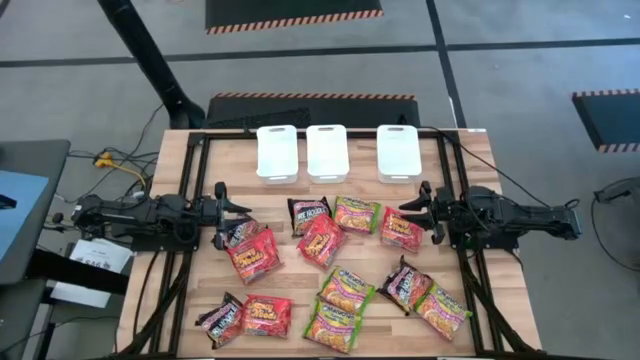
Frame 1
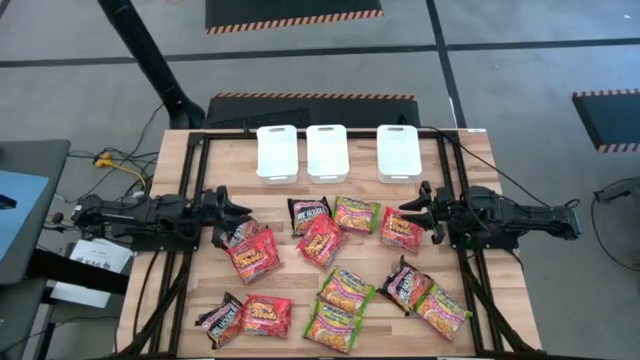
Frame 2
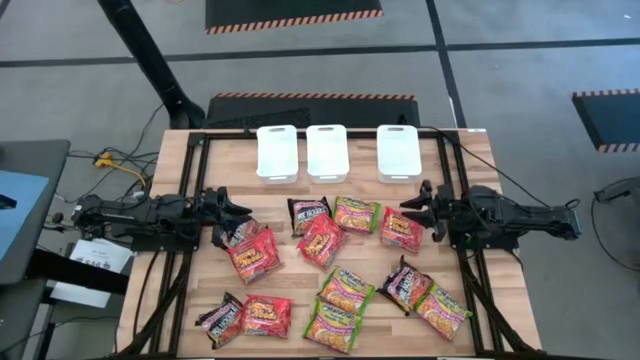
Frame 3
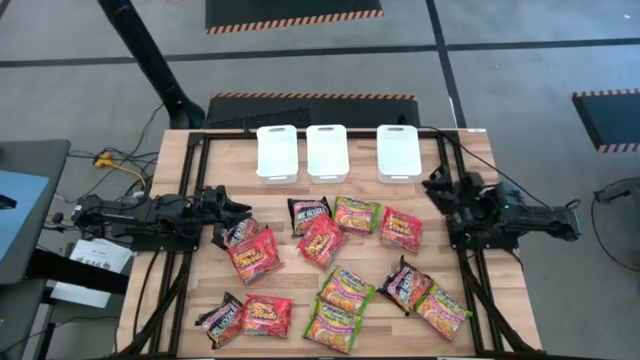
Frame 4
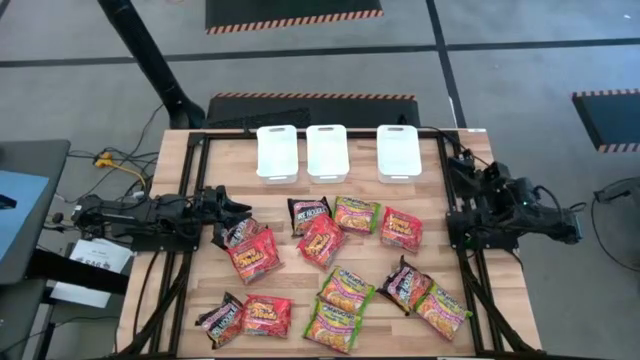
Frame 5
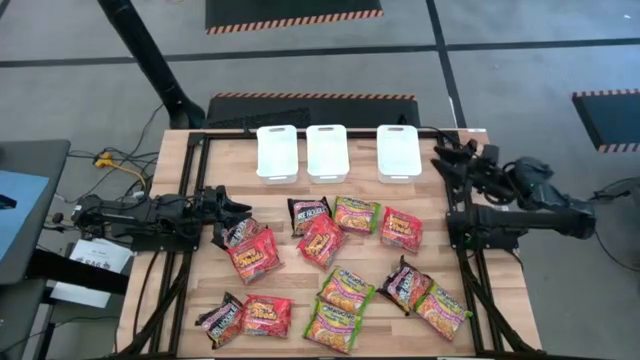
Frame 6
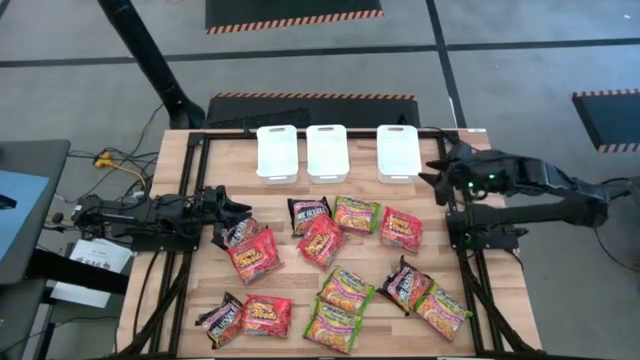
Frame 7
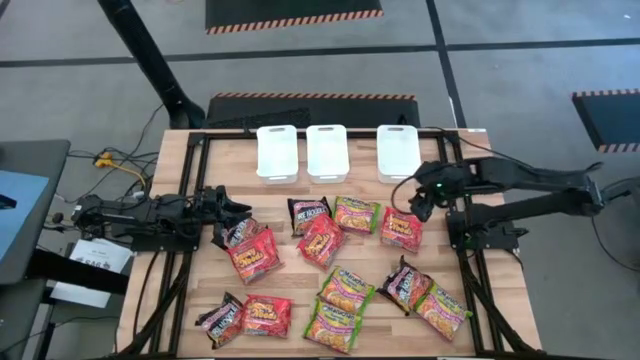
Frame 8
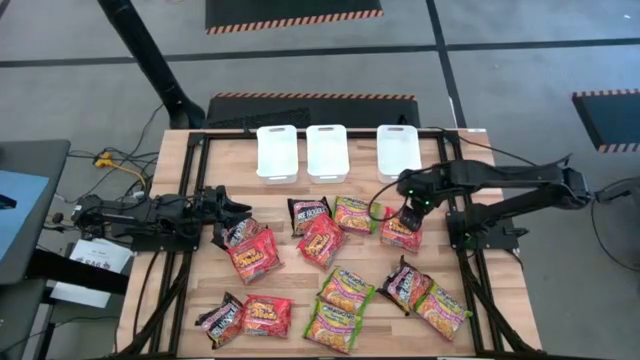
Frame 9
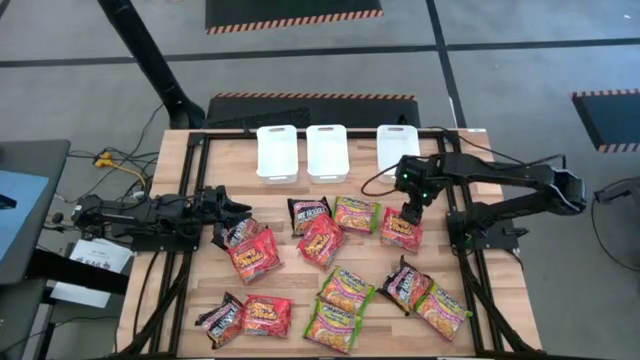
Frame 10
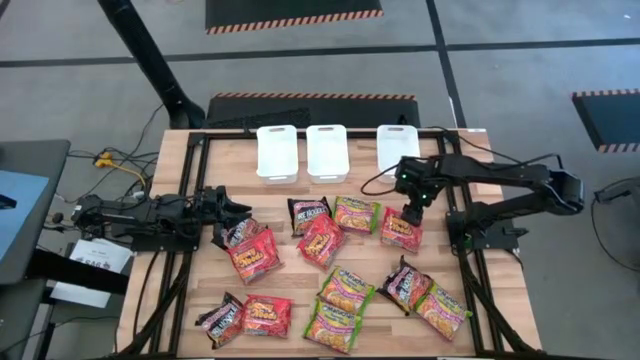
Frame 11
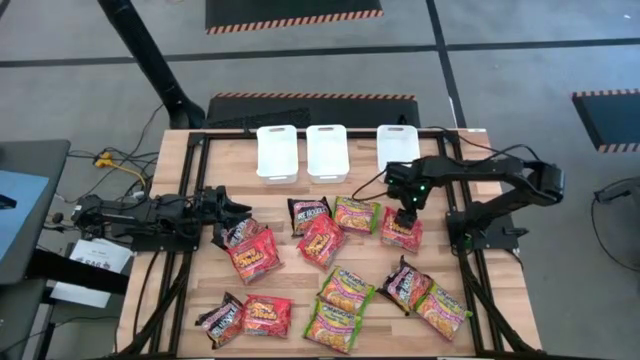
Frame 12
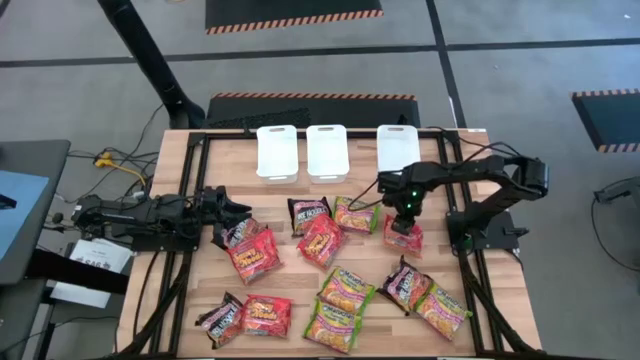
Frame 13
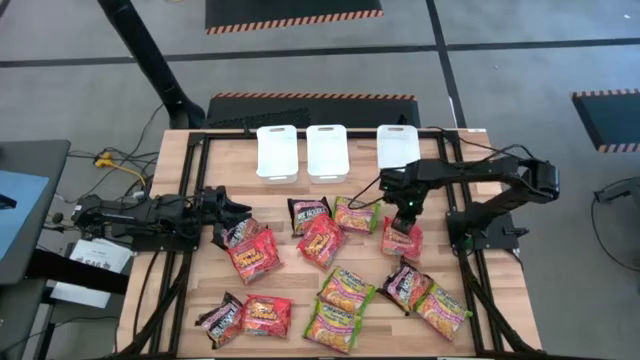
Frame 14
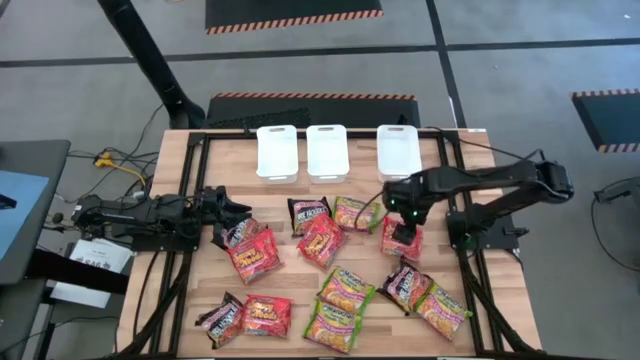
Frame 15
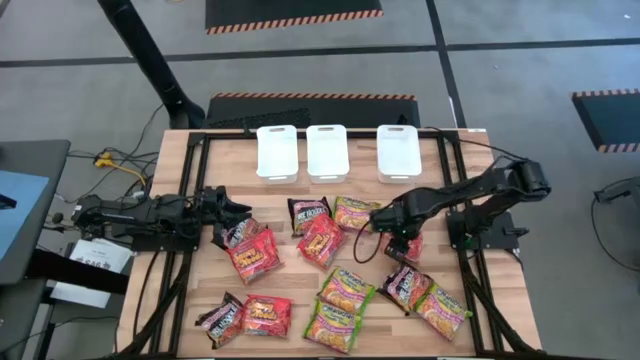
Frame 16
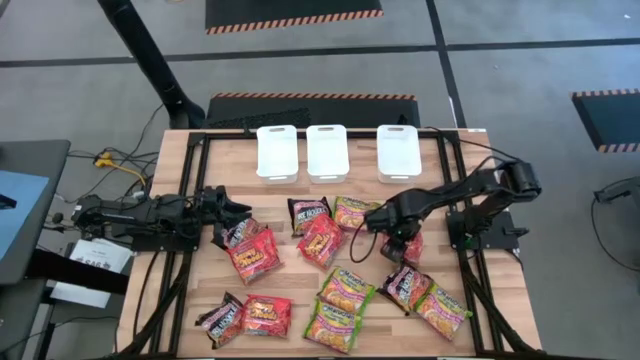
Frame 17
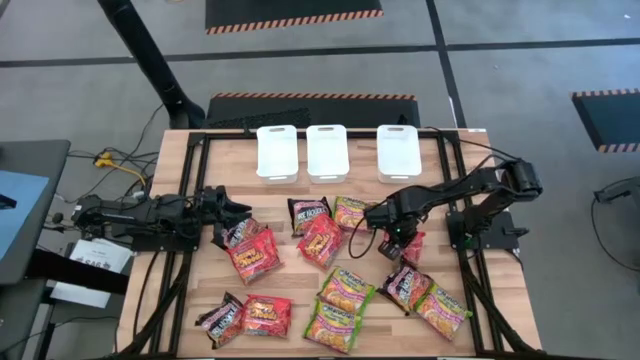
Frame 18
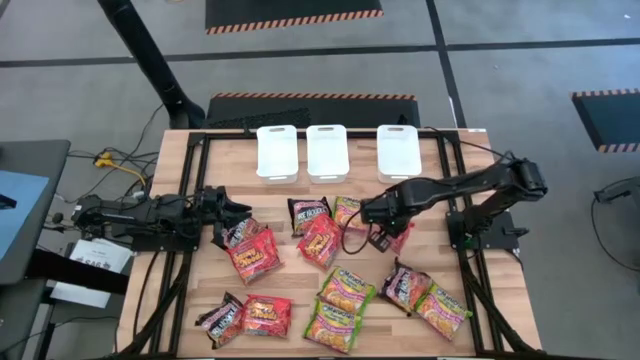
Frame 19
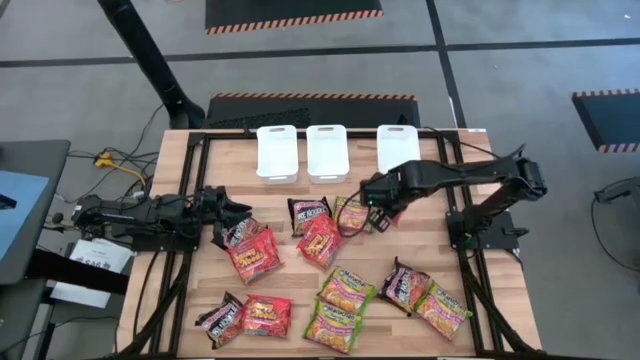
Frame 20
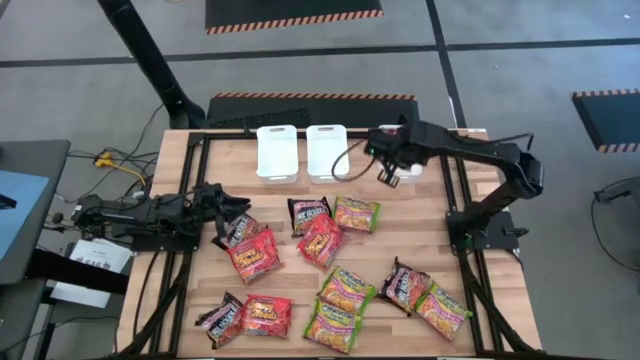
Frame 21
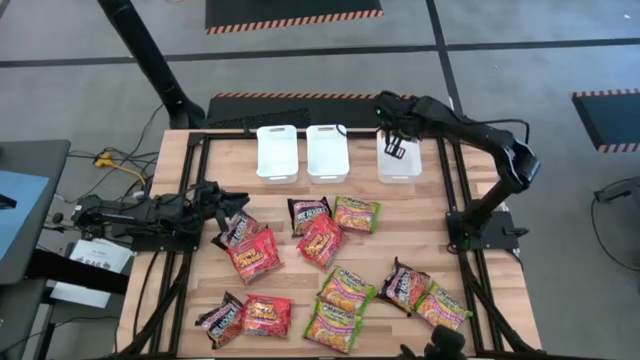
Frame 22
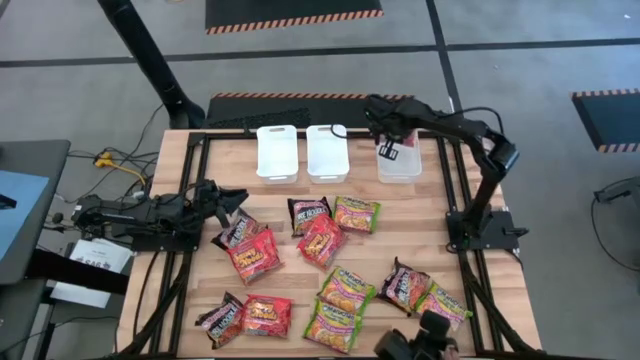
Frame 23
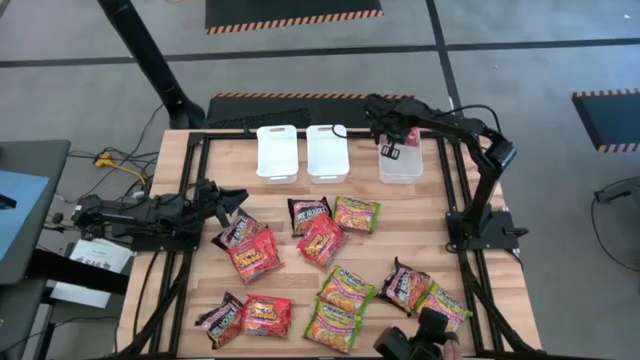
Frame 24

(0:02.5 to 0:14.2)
Task: Sort Maruchan noodles
Put the orange noodle pack into the right white bin

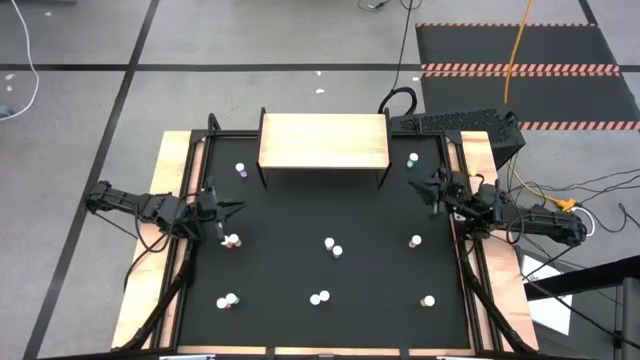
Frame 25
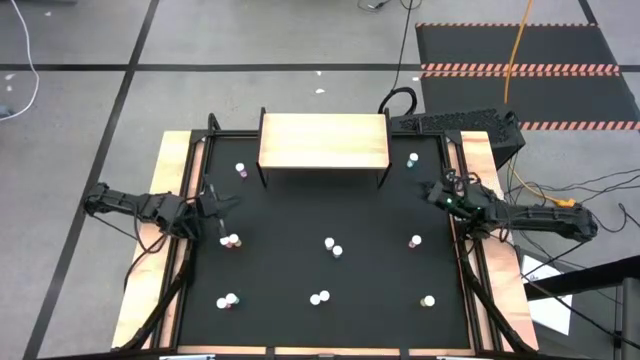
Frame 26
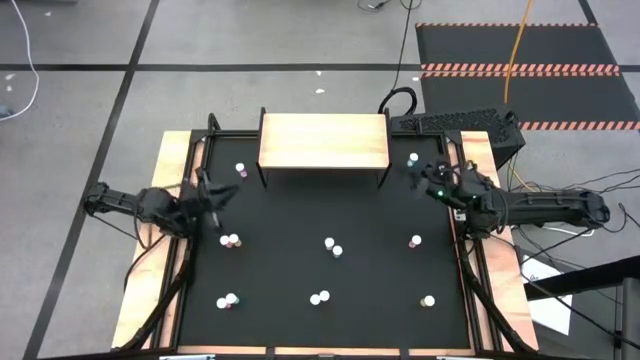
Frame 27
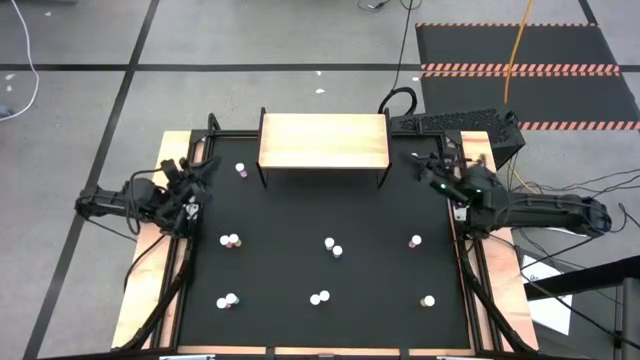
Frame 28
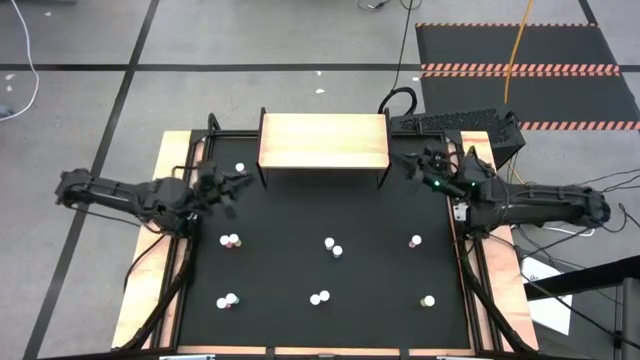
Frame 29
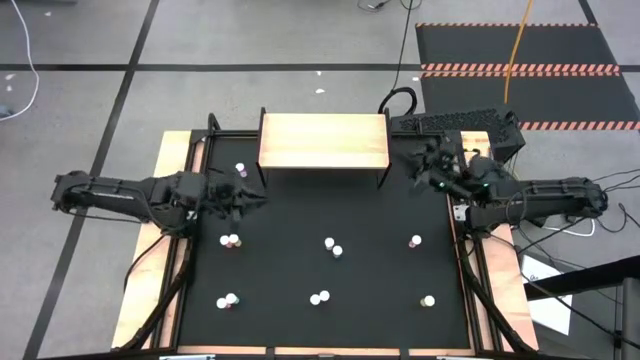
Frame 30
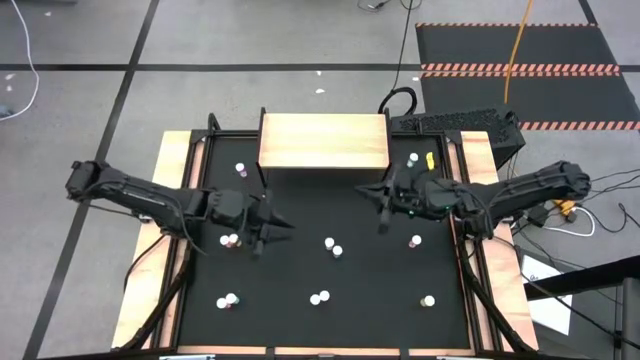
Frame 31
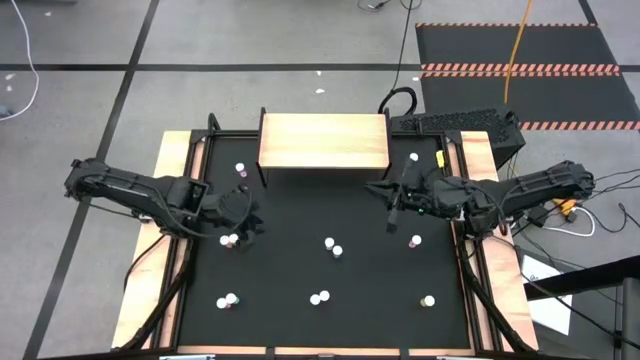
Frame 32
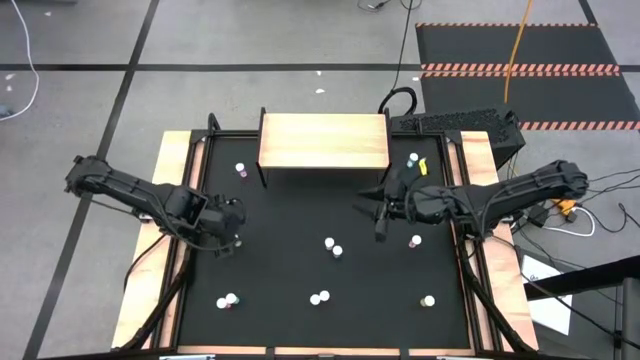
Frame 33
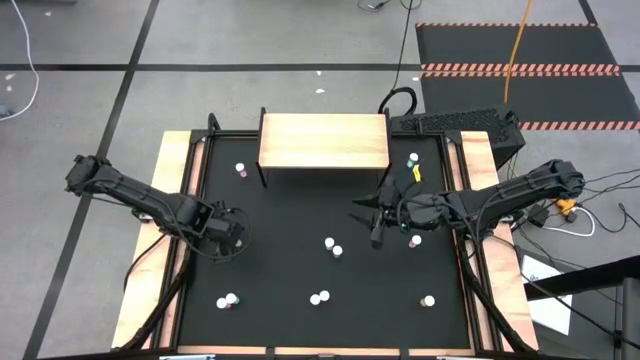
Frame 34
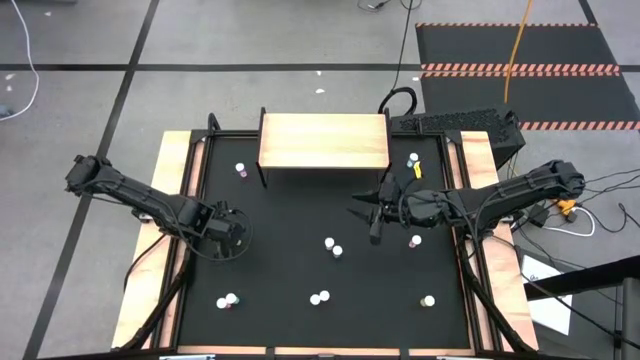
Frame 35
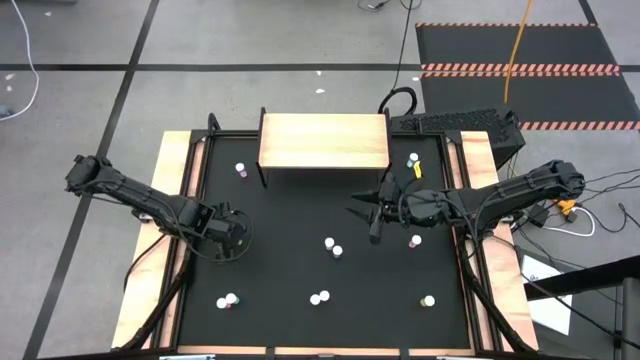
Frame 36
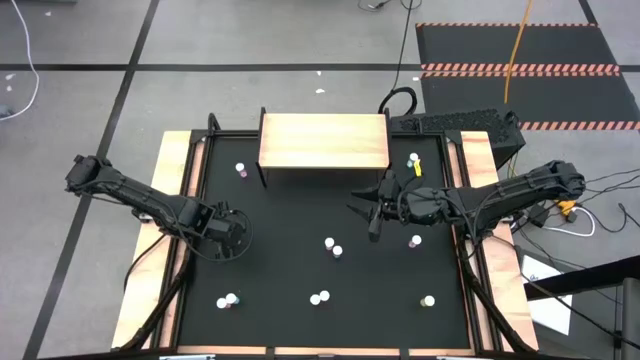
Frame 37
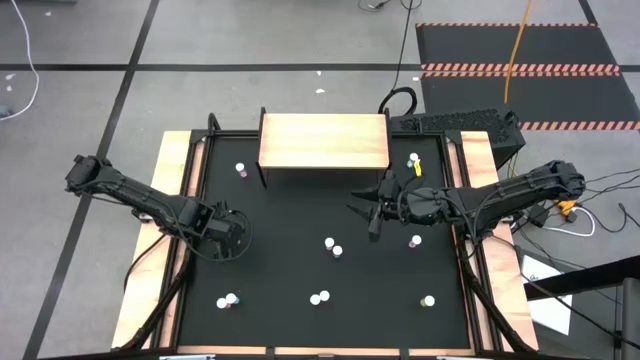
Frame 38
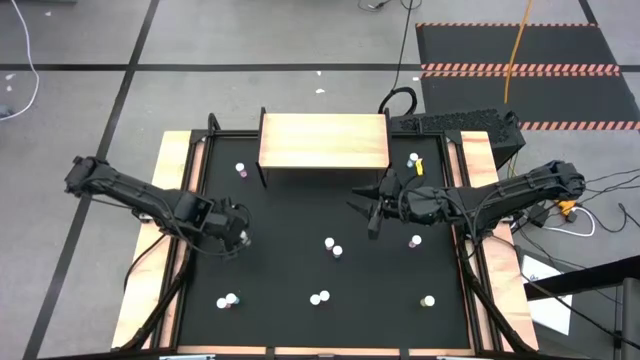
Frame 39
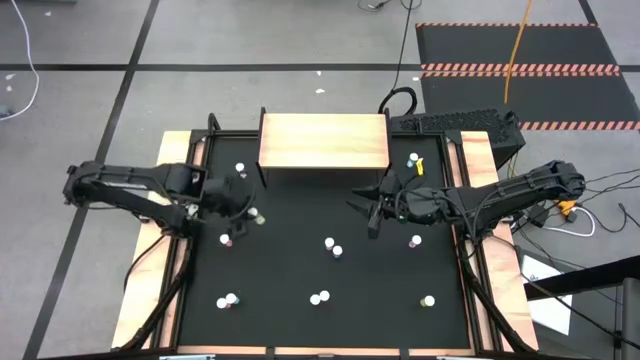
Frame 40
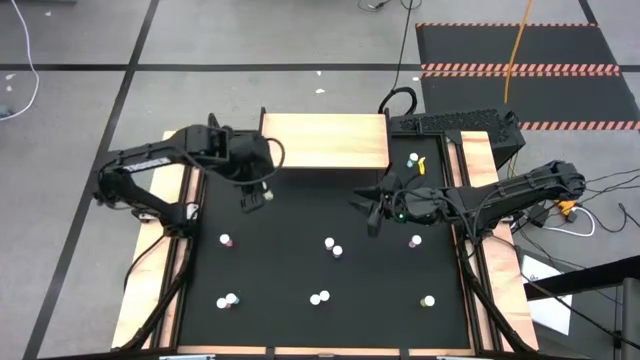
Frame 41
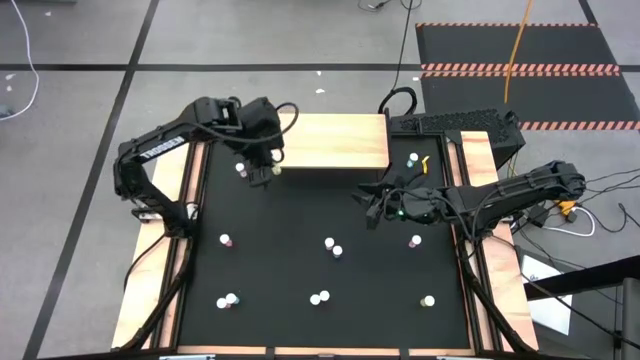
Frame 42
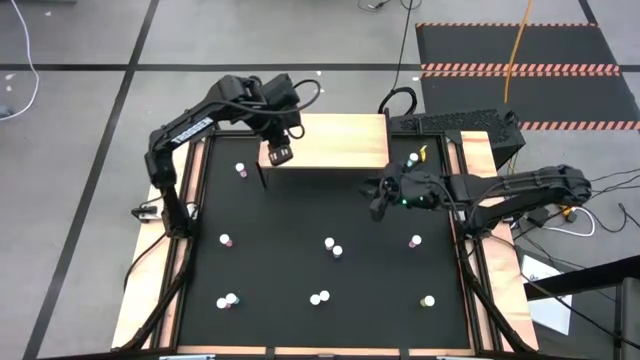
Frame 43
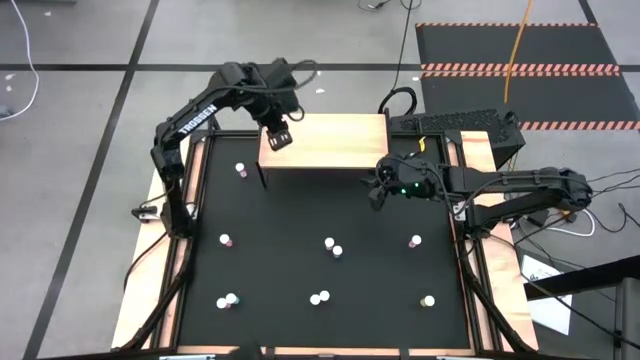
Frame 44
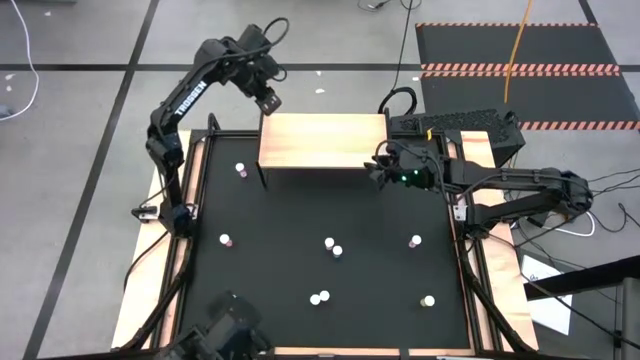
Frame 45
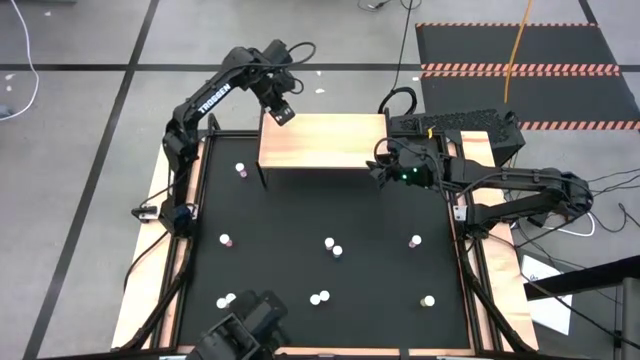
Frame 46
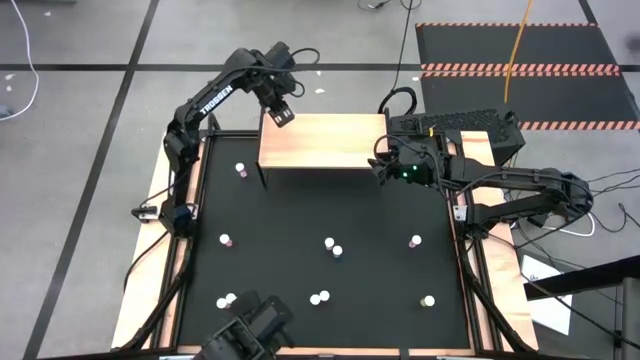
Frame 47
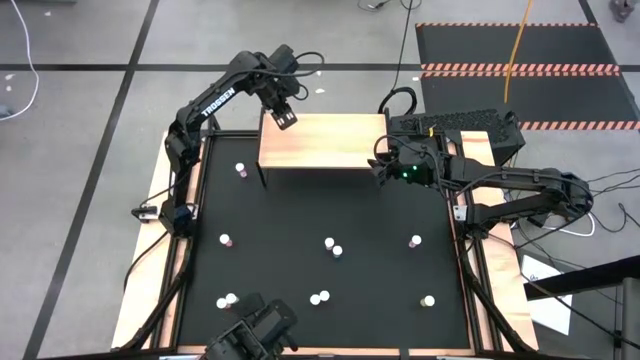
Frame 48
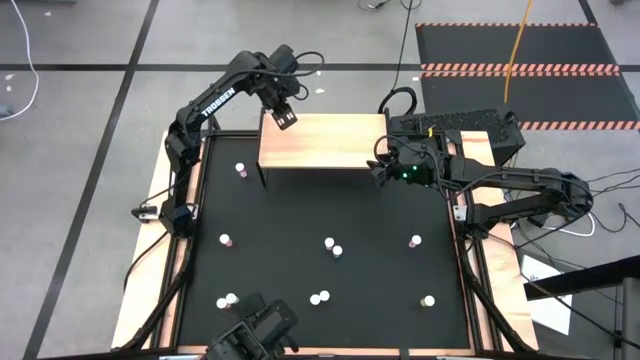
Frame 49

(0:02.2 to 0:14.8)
Task: Pick and place medicine bottles onto shelf by color
Put the top left yellow pill bottle on the shelf
